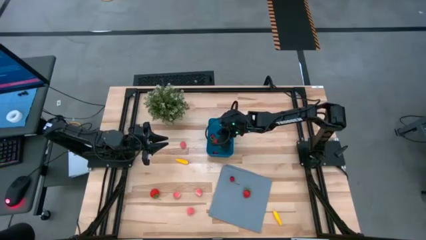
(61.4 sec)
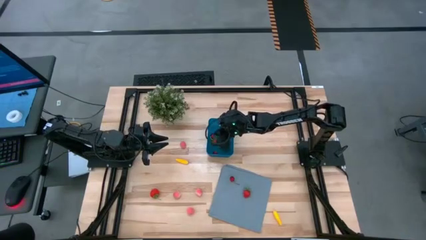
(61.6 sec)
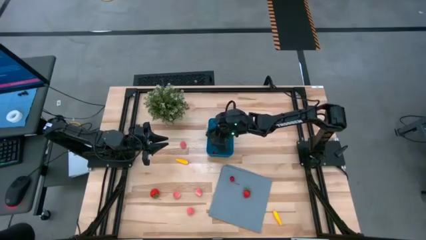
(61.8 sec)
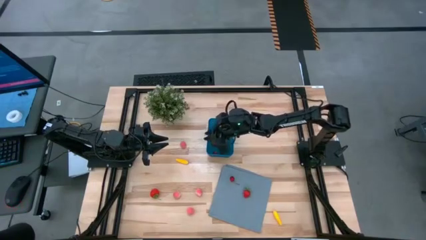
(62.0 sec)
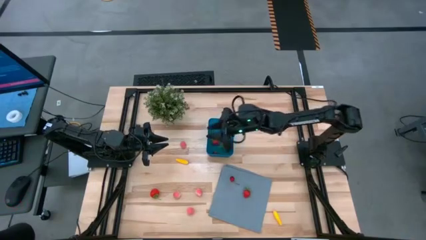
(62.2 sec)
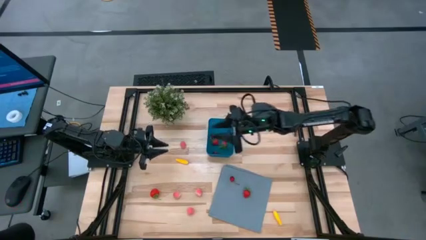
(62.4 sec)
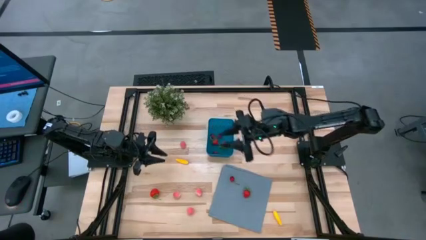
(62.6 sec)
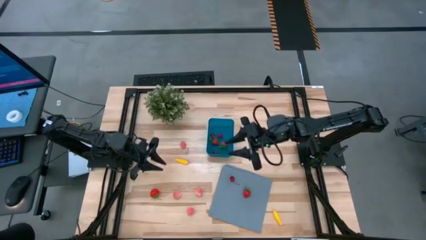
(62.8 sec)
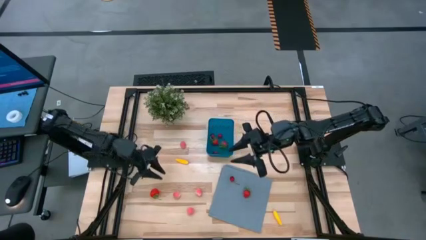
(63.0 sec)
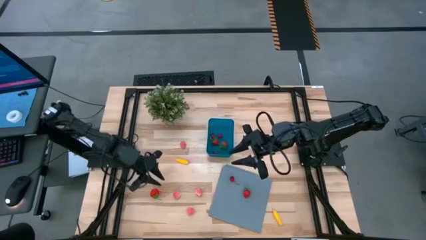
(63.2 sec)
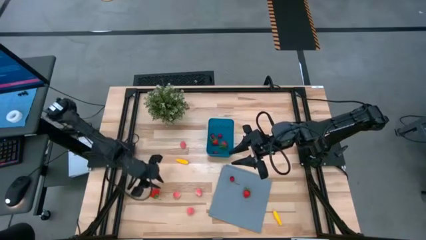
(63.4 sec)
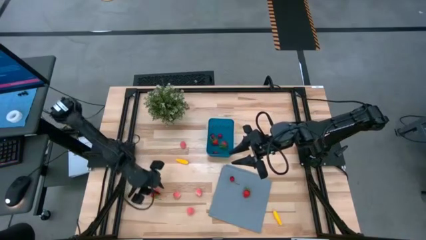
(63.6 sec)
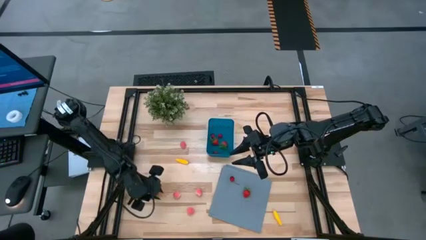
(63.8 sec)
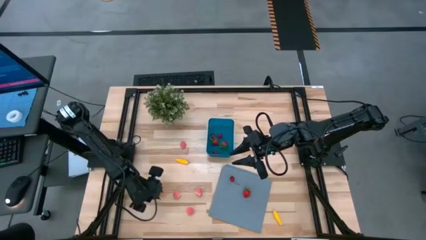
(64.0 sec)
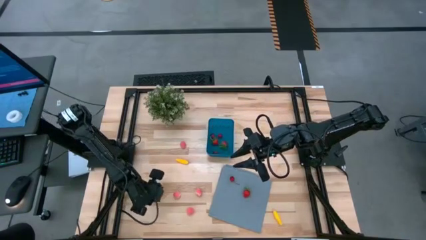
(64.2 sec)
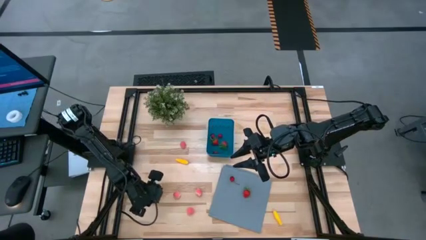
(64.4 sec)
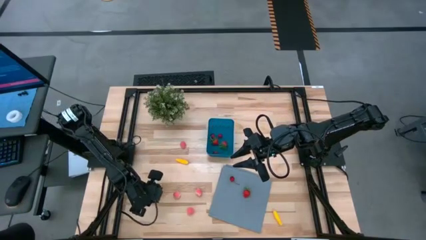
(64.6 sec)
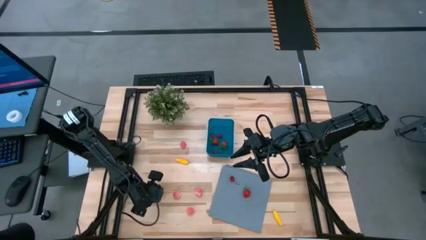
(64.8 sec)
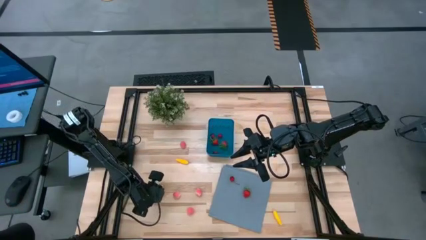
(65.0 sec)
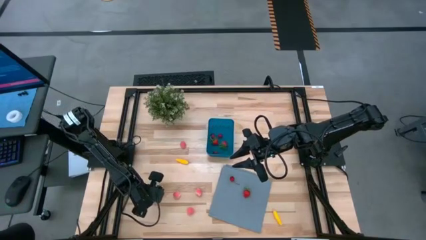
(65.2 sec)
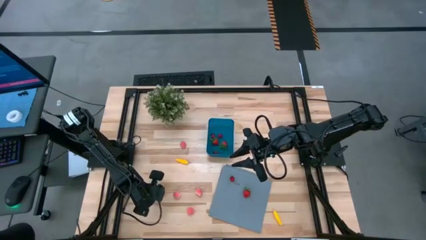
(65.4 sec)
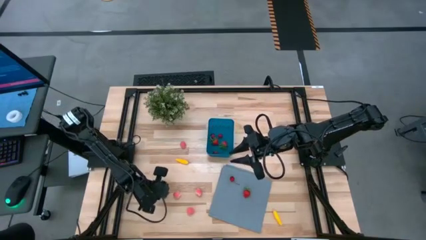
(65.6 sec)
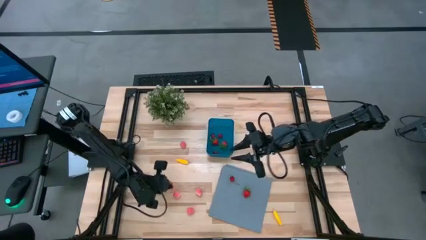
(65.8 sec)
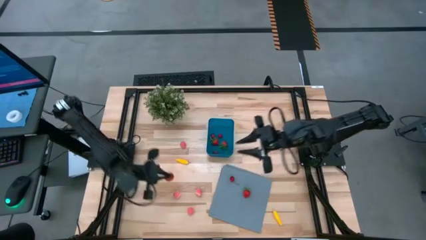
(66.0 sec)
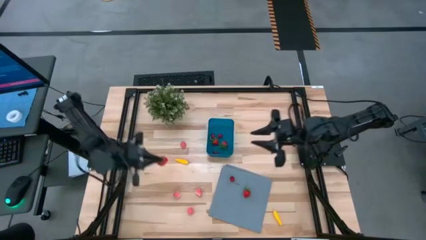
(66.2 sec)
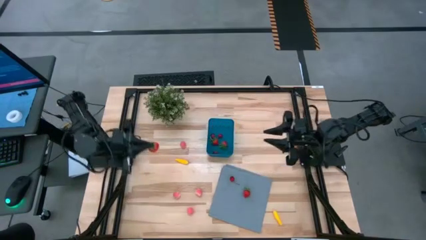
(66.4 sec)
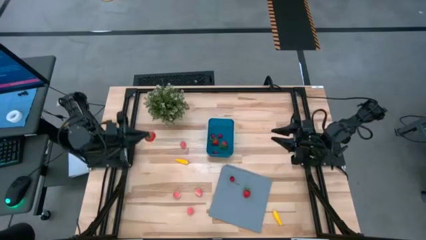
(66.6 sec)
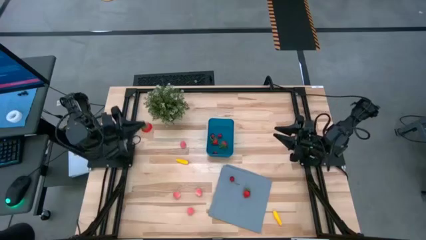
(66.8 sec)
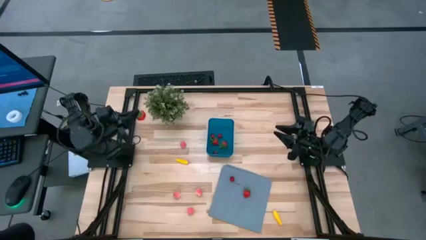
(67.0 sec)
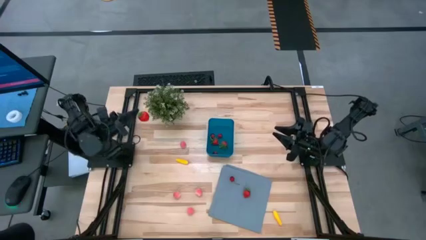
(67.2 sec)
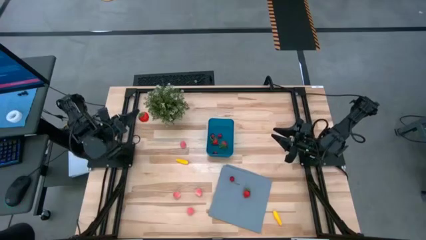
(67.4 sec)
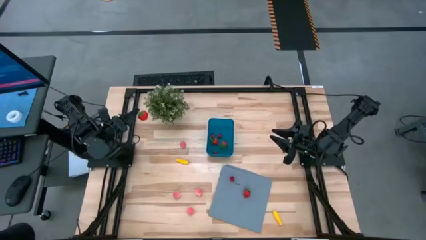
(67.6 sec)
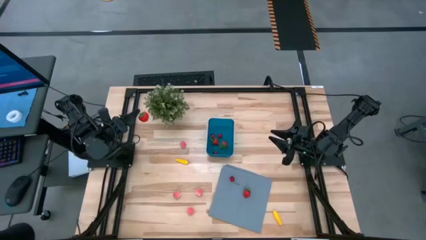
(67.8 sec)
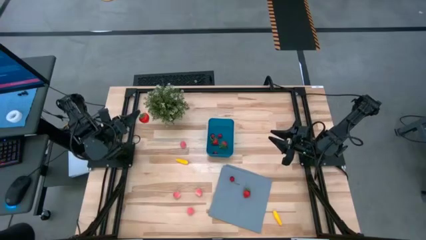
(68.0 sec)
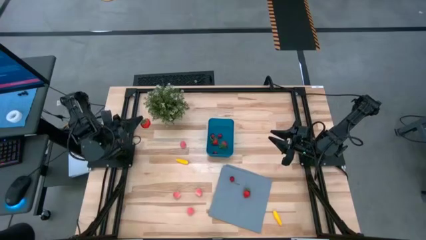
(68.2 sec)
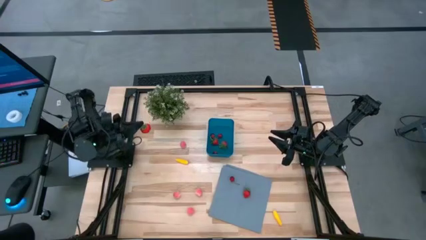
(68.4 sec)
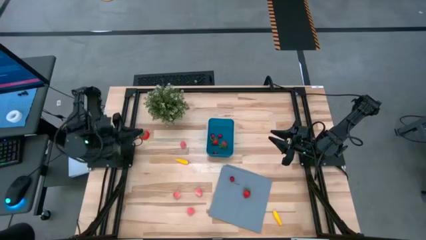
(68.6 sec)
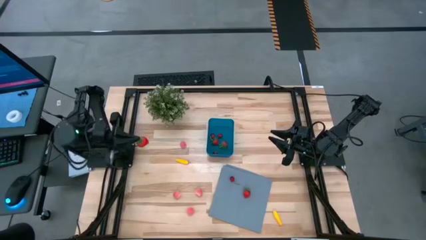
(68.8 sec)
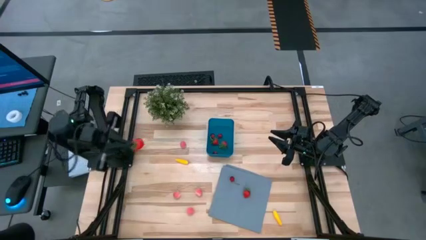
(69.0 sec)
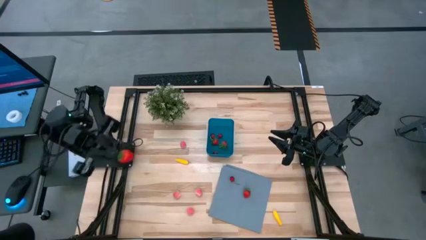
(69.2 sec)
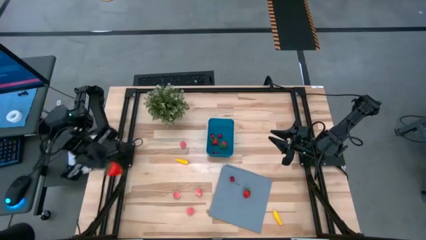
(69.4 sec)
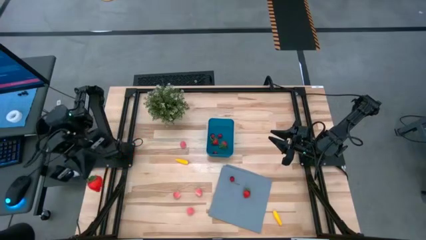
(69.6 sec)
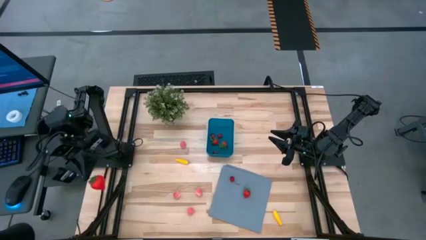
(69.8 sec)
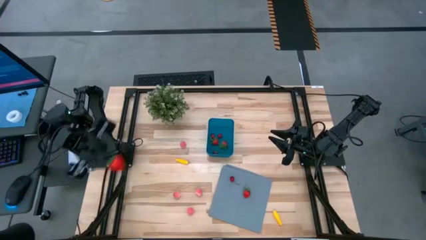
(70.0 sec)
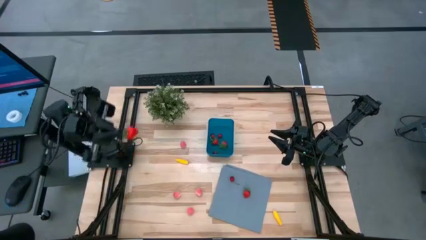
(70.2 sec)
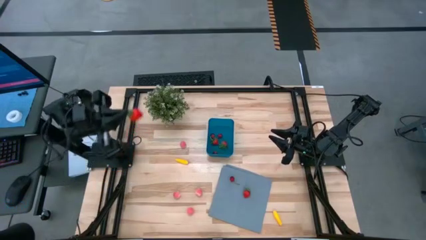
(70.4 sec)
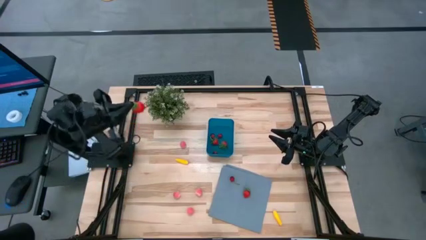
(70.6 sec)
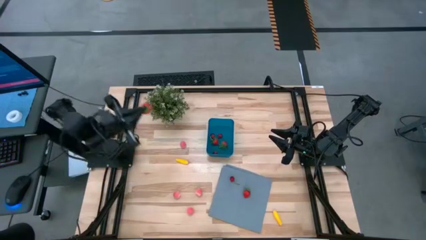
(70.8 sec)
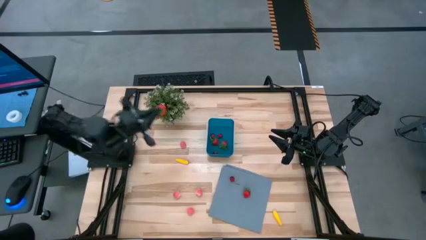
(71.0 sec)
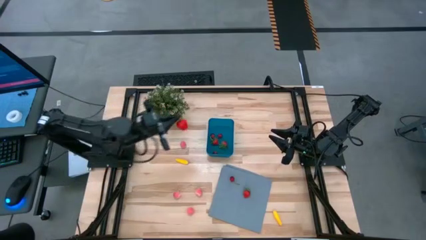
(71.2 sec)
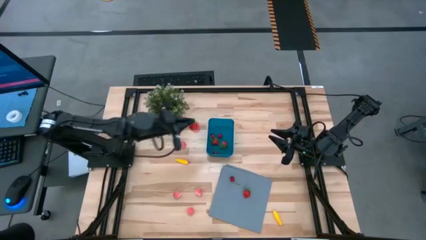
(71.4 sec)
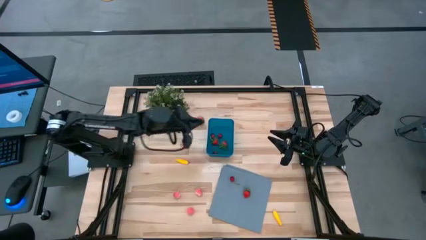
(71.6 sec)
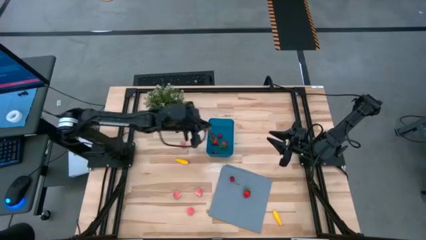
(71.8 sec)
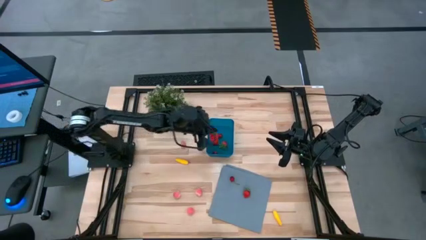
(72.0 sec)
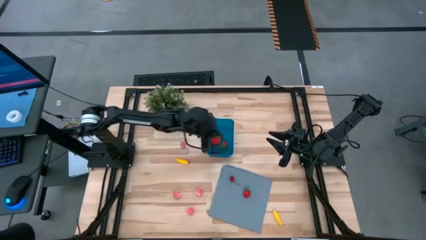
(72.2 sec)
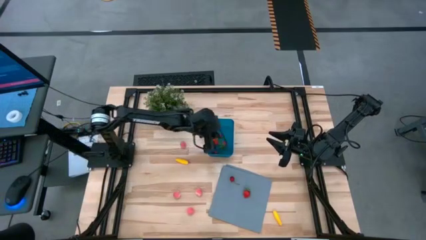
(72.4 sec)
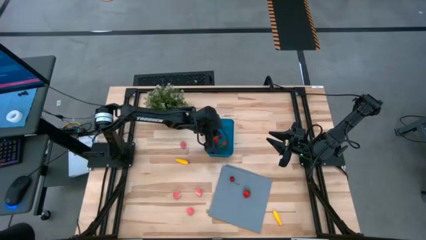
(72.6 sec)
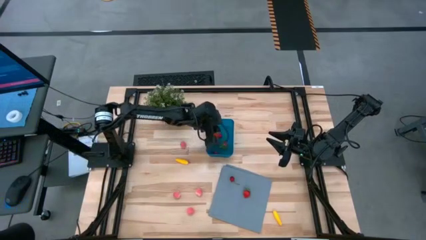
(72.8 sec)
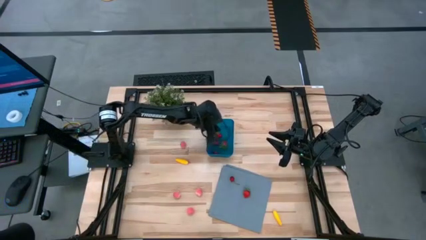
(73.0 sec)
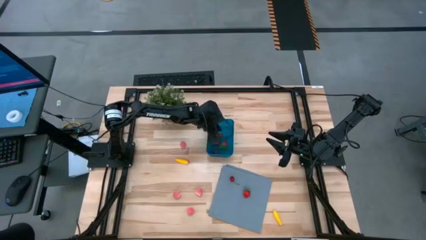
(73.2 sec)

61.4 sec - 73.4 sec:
Task: Pick and placing Produce into tupperware
Put the strawberry into the blue bin
